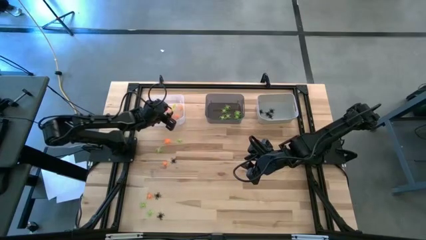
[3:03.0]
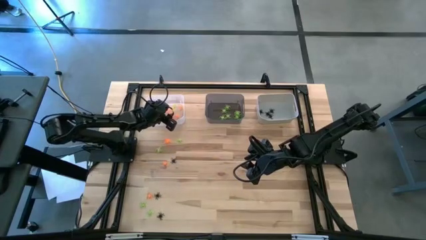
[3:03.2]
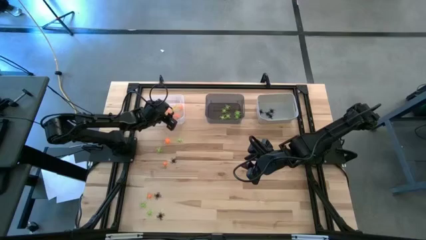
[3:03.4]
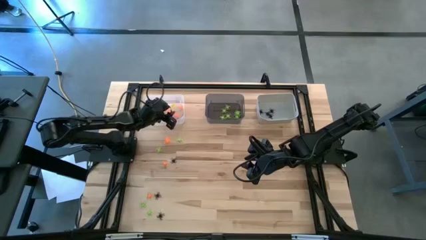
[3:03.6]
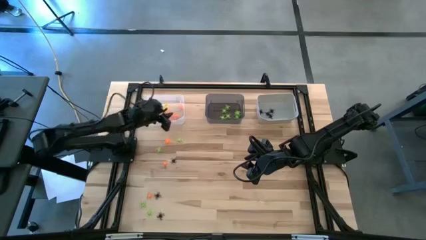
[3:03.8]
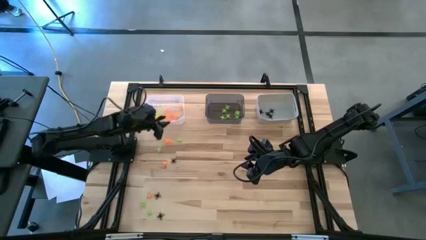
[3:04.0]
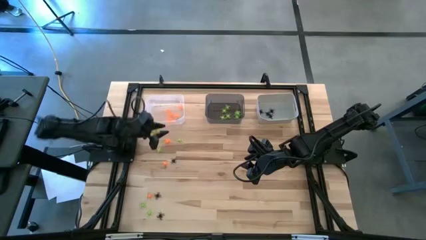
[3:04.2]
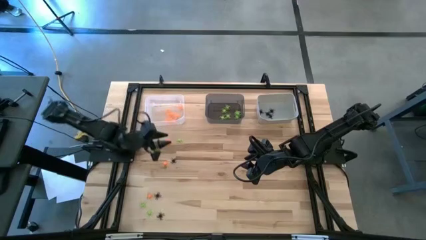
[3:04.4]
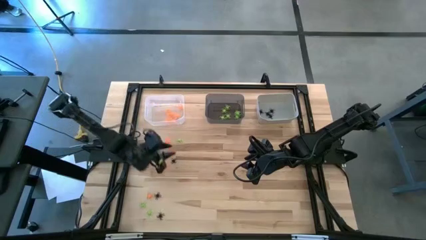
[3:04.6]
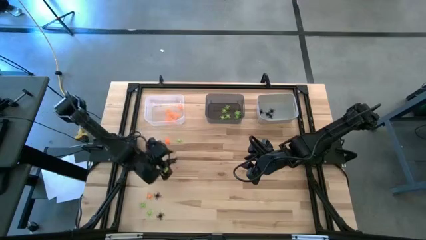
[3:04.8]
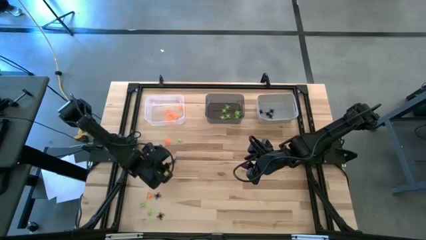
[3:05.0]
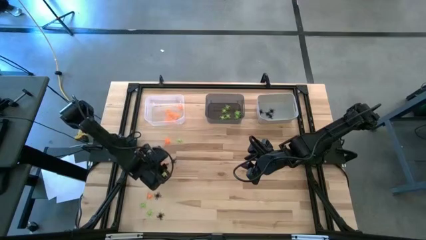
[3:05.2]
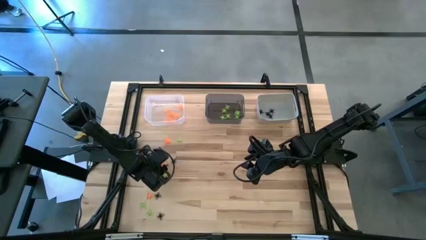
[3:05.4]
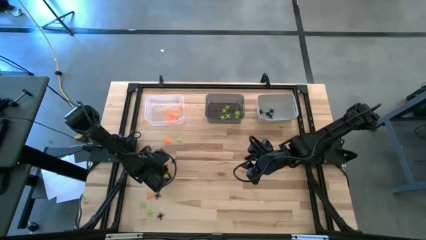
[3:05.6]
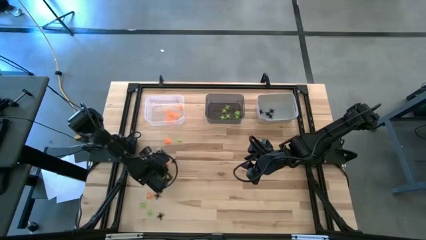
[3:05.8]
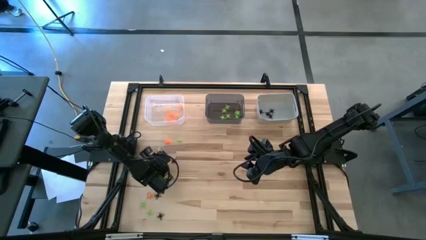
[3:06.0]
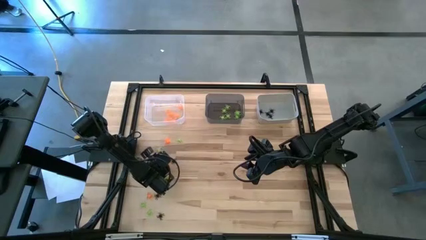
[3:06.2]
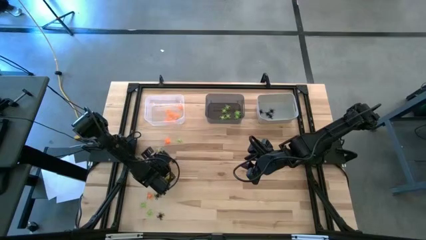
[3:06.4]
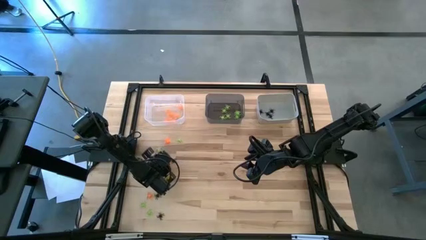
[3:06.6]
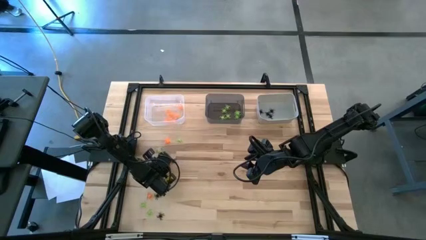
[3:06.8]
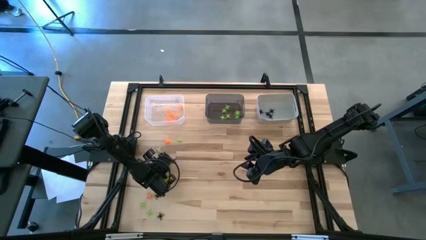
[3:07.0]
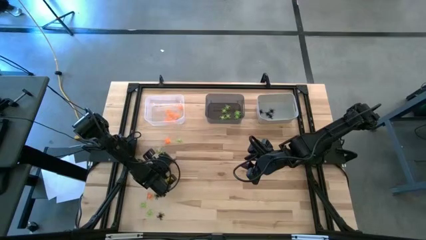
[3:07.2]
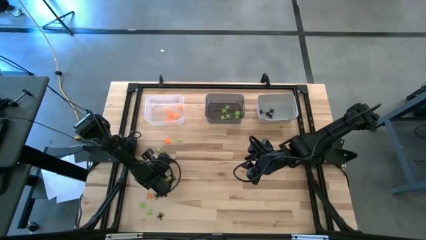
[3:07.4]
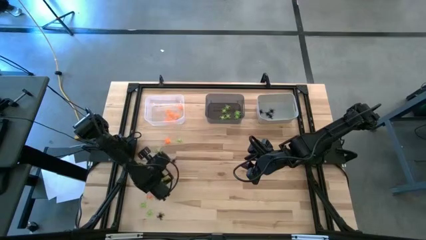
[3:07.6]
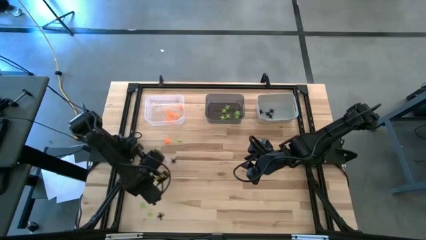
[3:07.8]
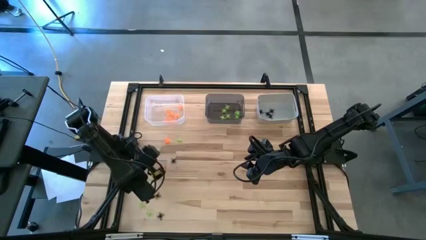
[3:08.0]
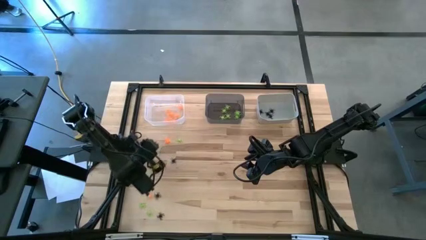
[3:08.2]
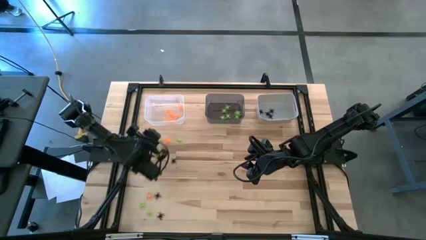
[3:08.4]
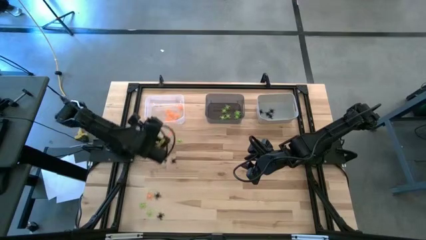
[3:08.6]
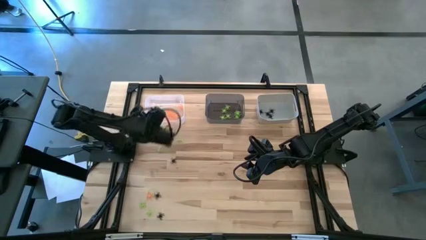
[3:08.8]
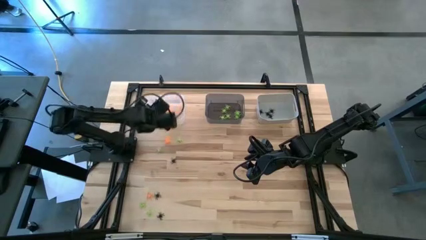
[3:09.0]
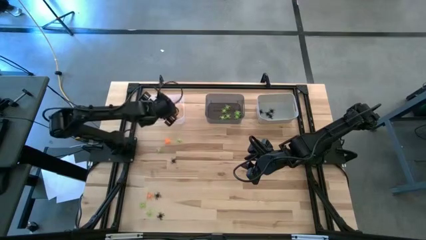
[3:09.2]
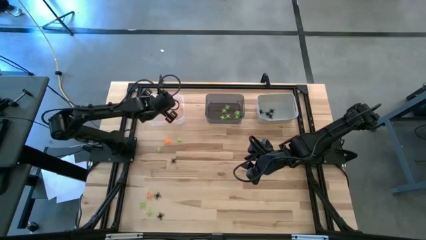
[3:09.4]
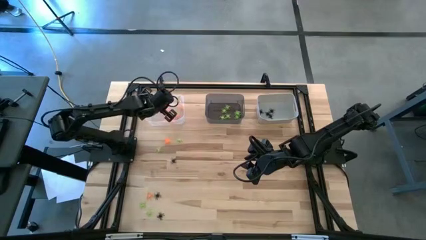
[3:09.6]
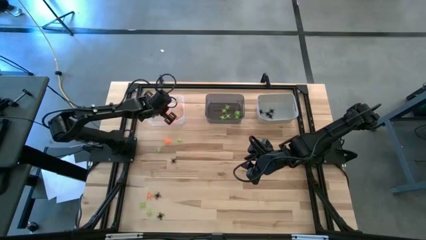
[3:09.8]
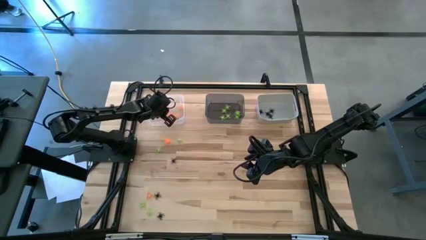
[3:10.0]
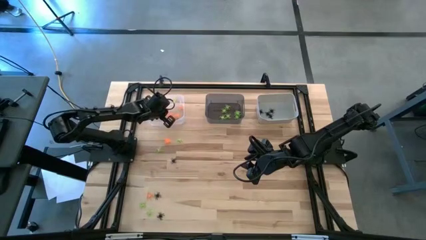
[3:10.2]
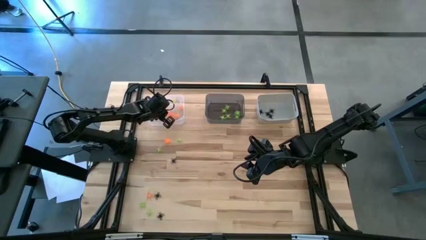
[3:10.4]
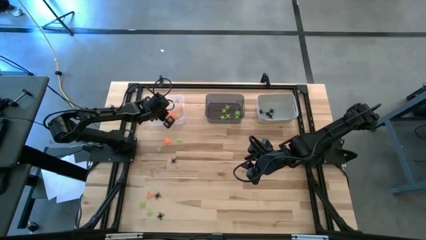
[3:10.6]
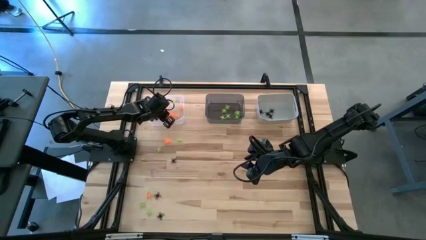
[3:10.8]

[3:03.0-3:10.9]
Task: Sort Halloween decoration
Put the orange spider toy into the transparent bin

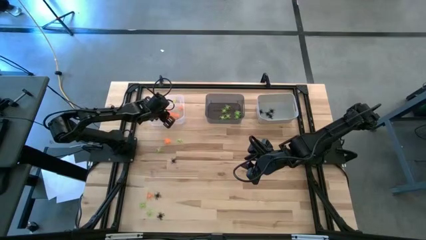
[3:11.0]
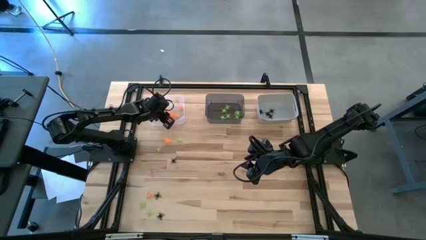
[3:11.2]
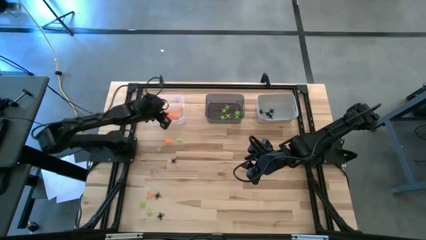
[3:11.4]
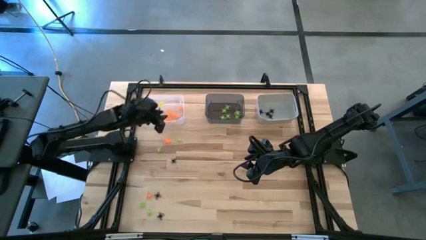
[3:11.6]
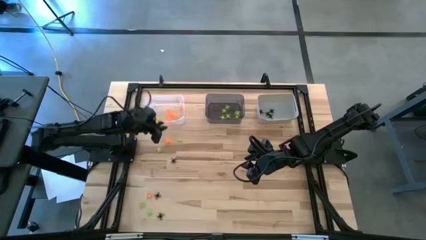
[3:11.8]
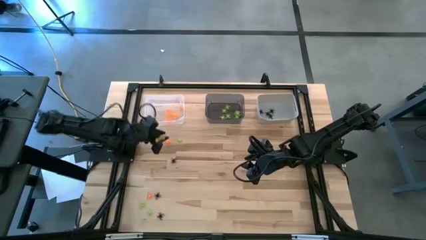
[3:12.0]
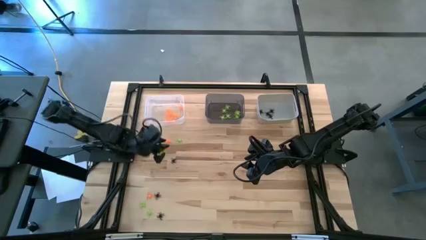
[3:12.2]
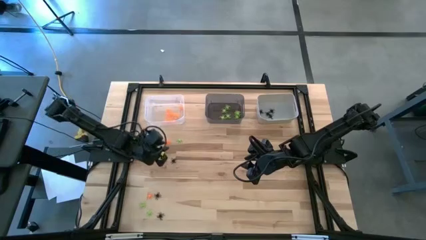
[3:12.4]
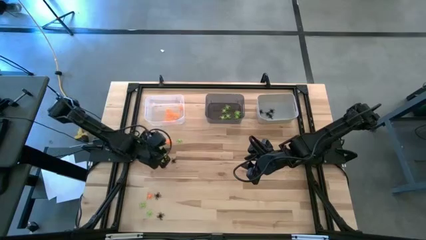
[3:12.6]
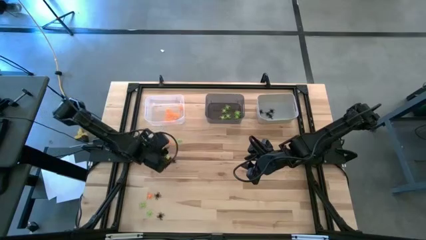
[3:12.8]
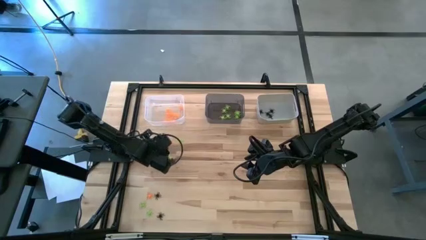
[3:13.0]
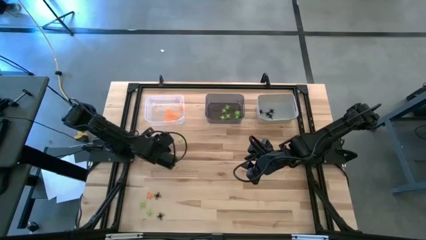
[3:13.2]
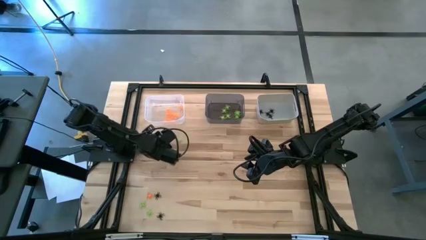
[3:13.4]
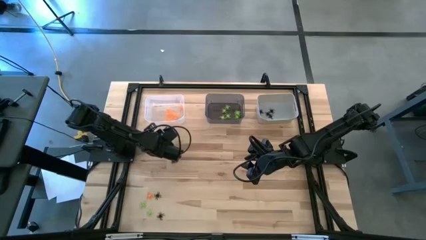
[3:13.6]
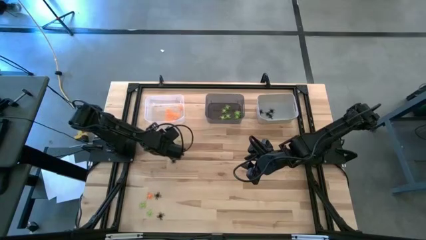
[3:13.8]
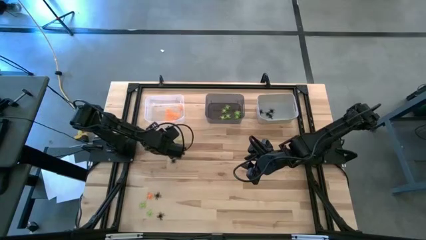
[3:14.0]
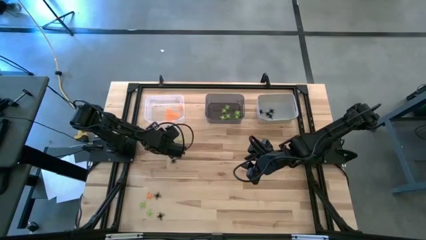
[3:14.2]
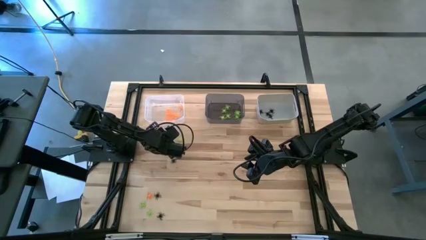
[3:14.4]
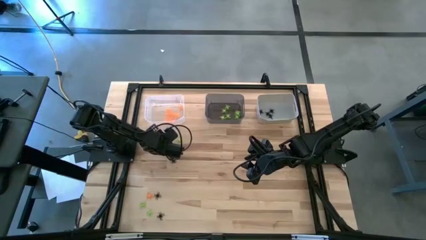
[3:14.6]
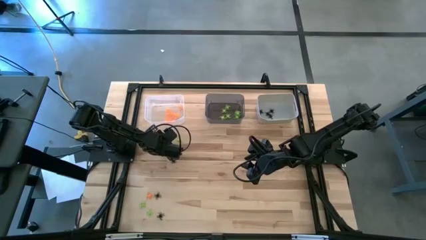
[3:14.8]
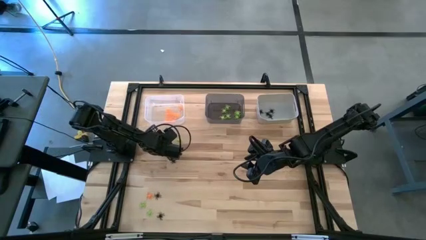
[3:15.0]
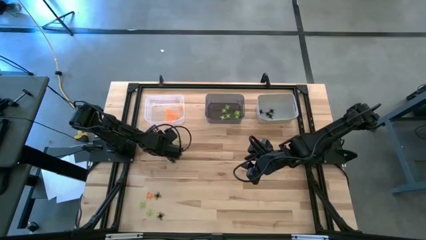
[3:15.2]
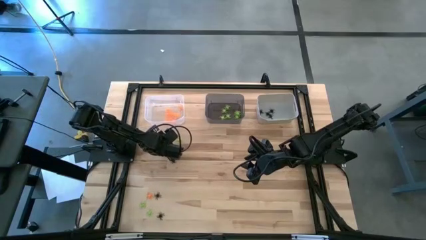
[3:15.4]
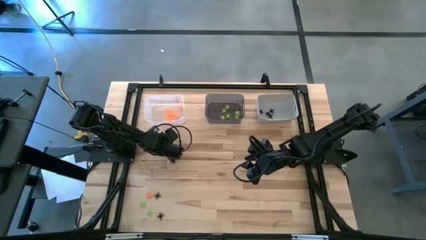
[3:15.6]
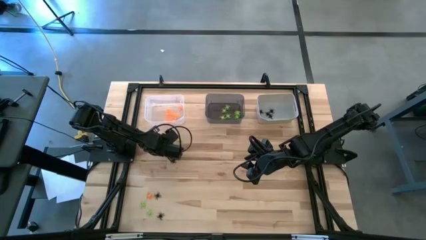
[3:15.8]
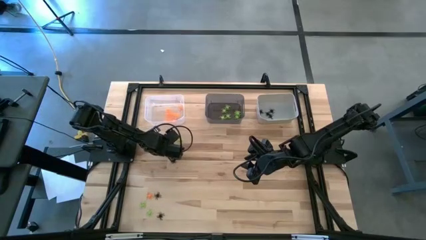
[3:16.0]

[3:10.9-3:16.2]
Put the orange spider toy into the transparent bin

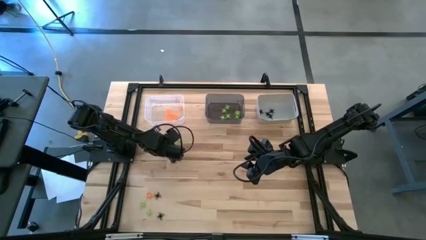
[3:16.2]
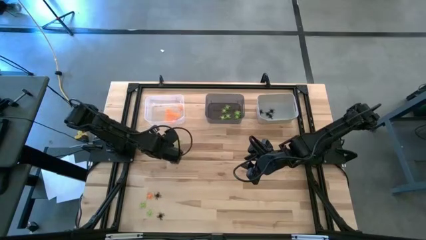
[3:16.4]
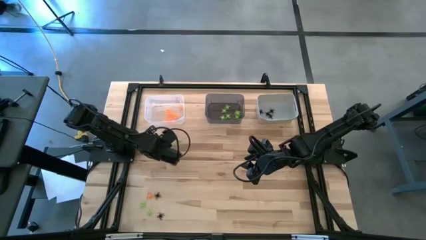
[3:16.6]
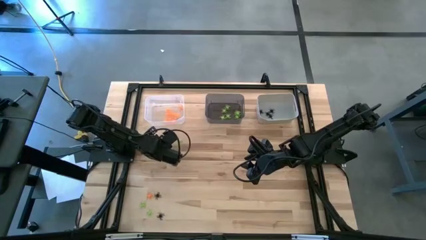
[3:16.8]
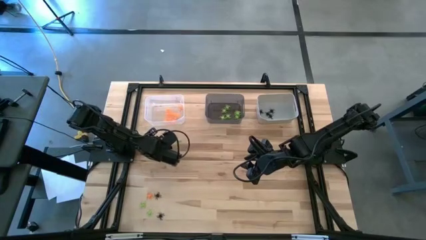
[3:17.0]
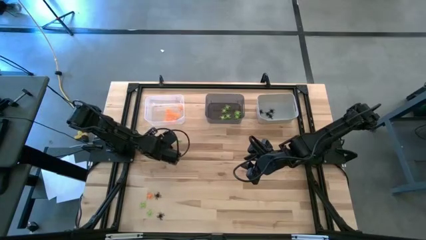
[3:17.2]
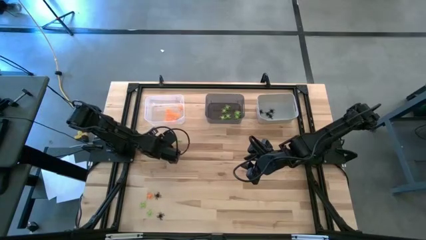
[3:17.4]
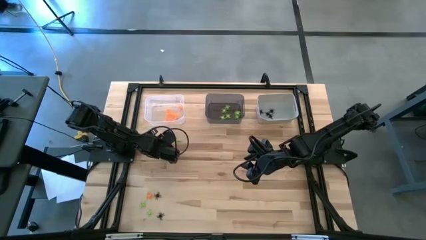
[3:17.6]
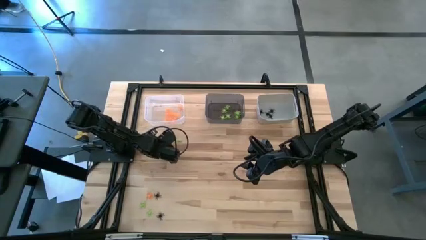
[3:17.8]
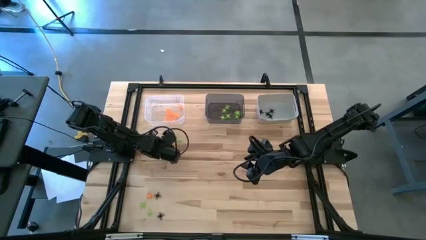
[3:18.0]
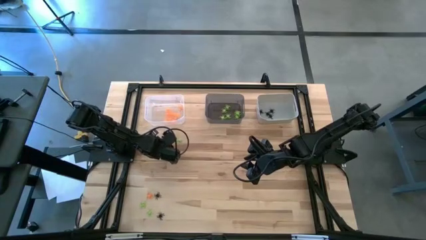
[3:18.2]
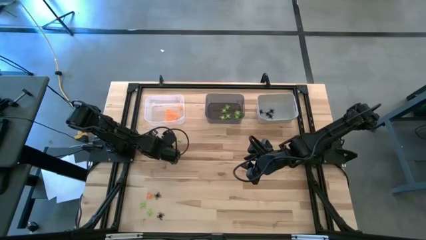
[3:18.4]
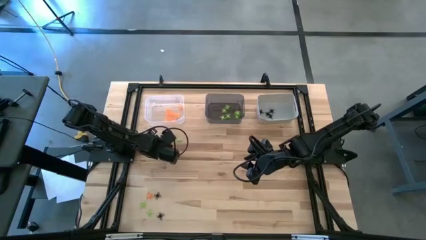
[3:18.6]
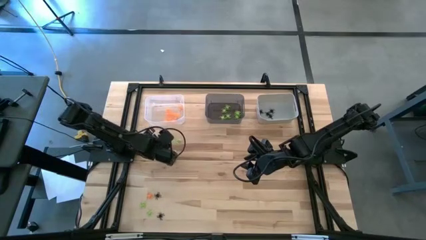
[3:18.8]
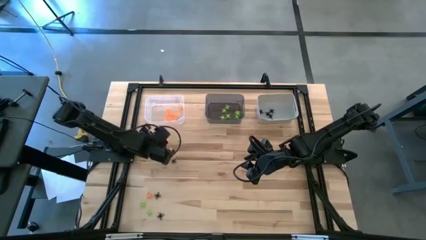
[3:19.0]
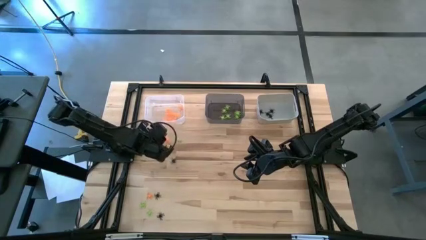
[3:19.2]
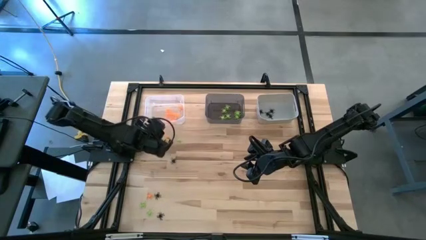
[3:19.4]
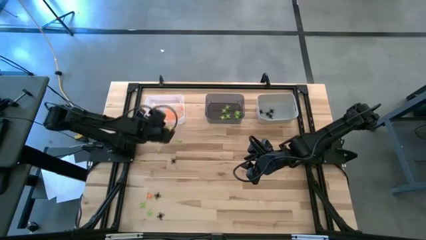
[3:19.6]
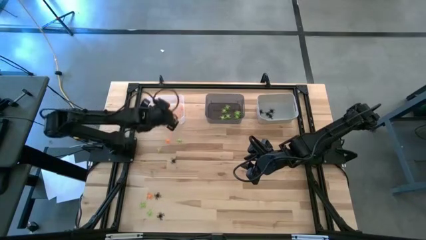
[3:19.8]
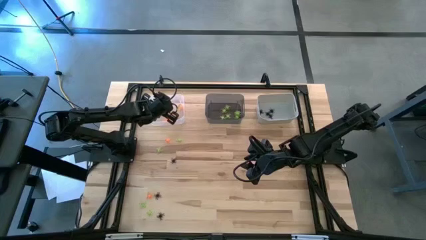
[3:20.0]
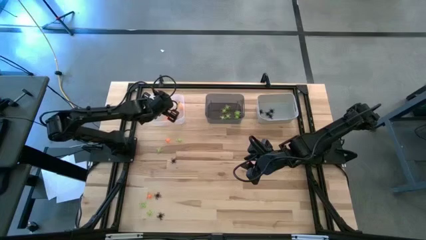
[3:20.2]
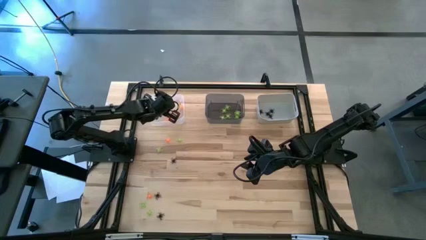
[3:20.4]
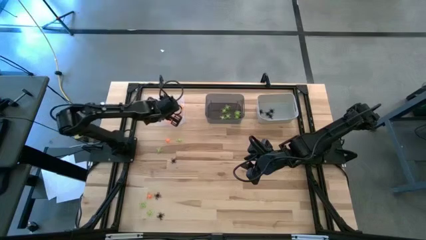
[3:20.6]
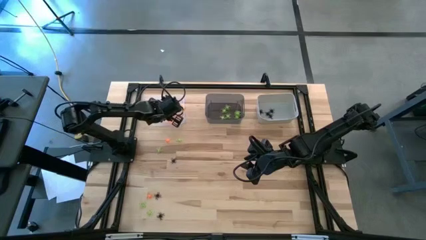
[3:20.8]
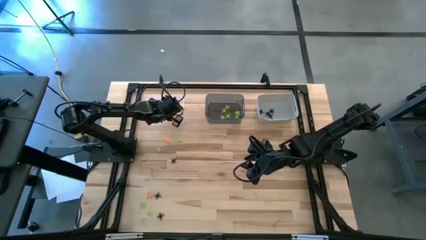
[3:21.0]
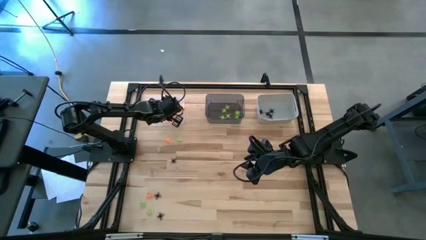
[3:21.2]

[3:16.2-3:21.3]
Put the orange spider toy into the transparent bin
